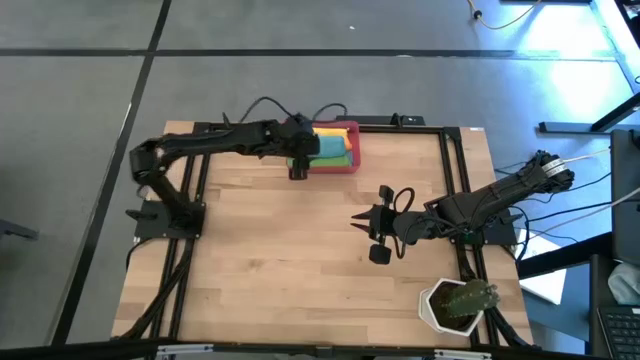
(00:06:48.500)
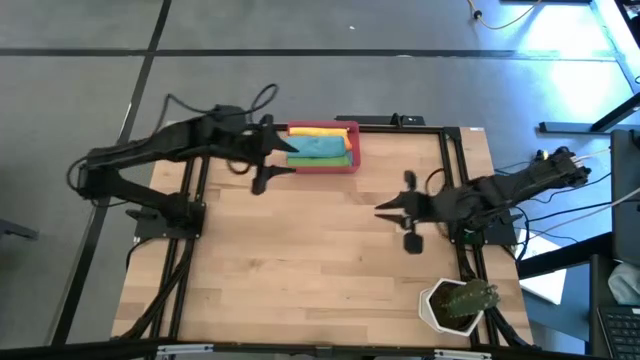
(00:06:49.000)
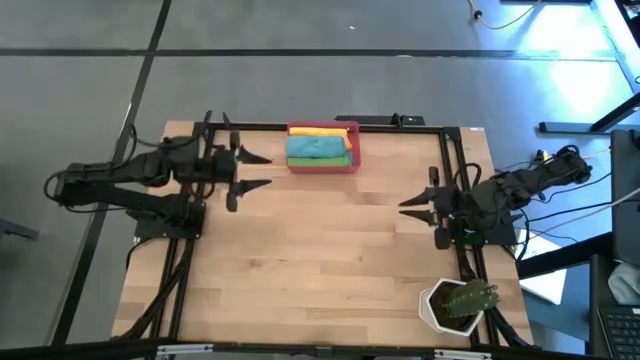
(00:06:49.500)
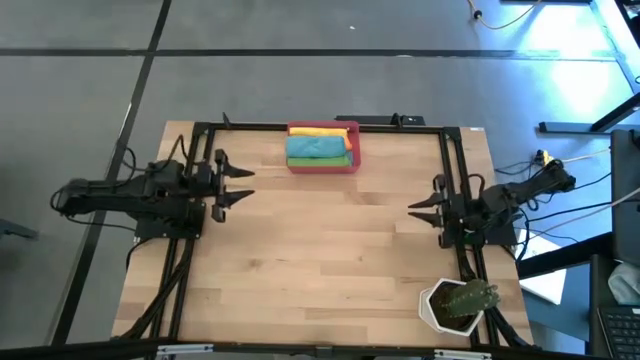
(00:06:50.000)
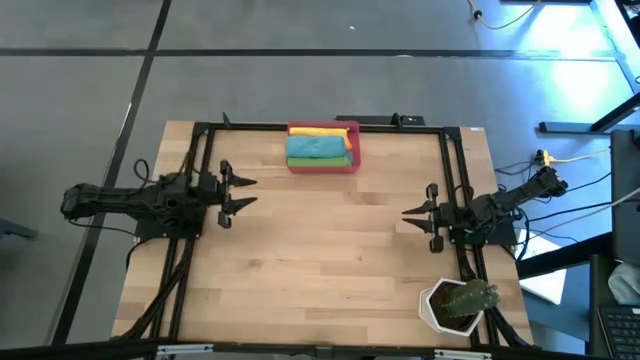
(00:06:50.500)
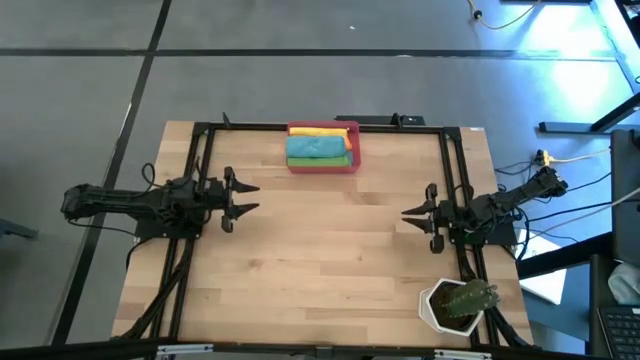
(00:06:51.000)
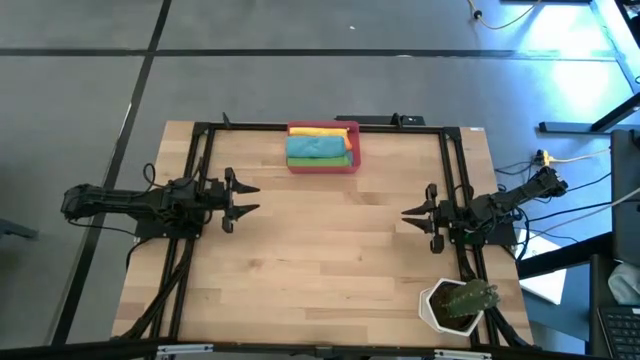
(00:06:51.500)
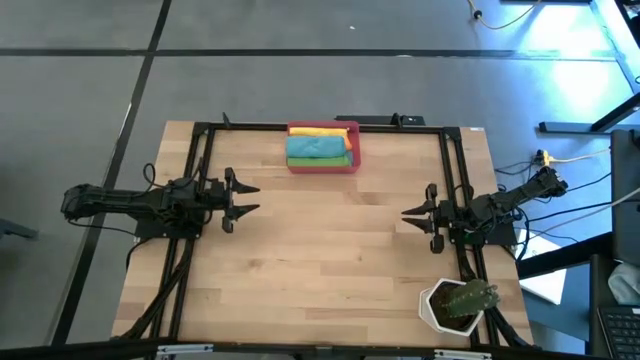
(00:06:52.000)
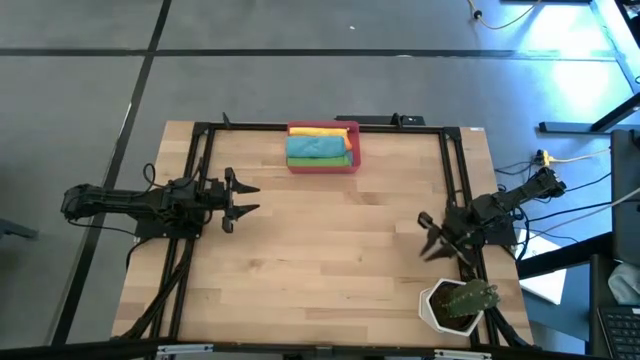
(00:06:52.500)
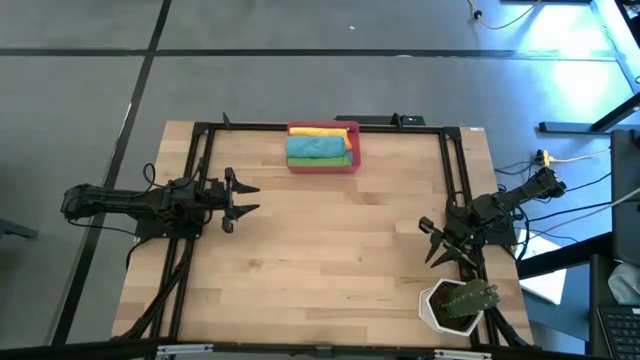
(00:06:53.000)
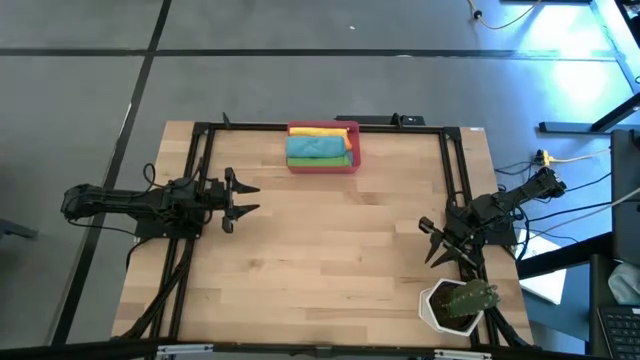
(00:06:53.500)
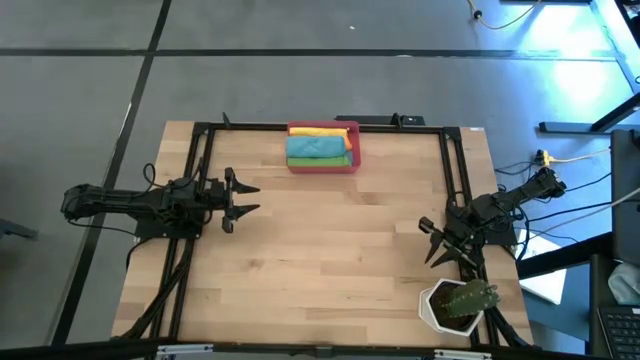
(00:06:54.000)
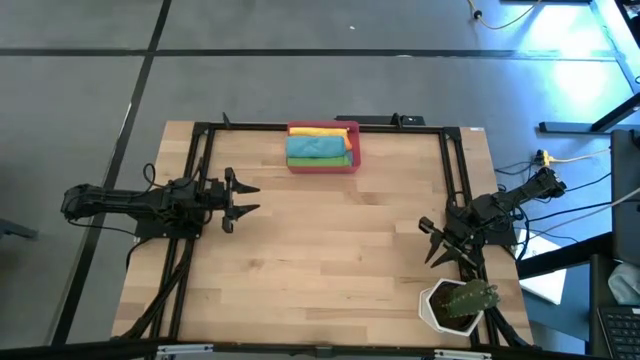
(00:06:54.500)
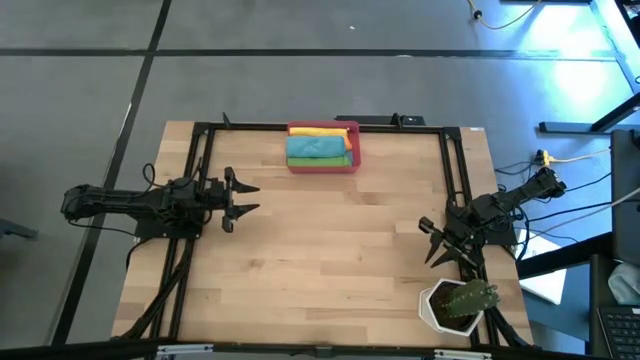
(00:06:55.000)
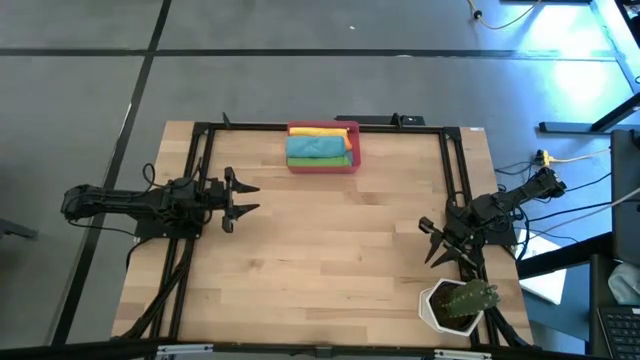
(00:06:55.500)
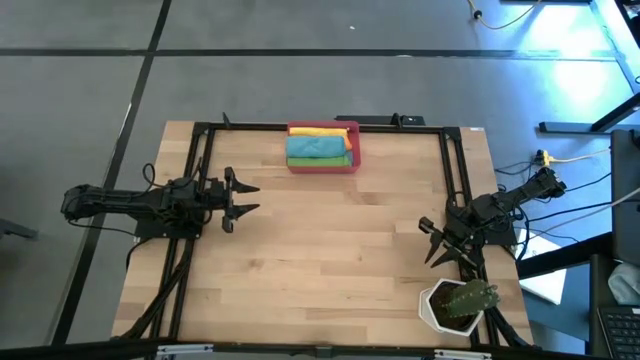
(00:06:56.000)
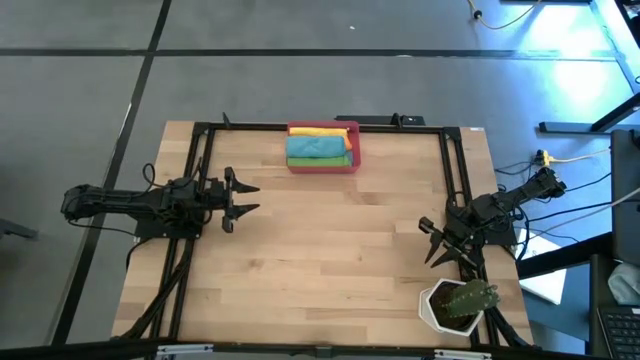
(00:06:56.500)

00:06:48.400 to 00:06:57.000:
Task: Roll microfiber towels into tight, uniform cylinder then place into a basket
Return to Home Position

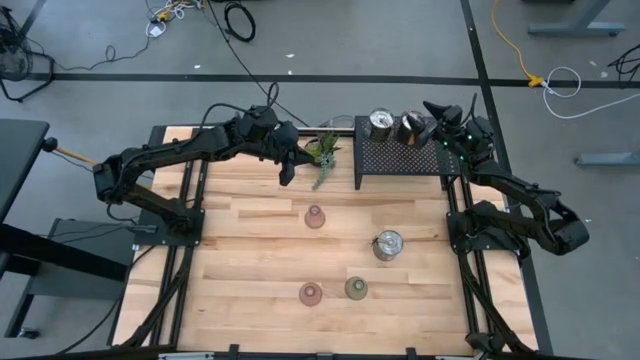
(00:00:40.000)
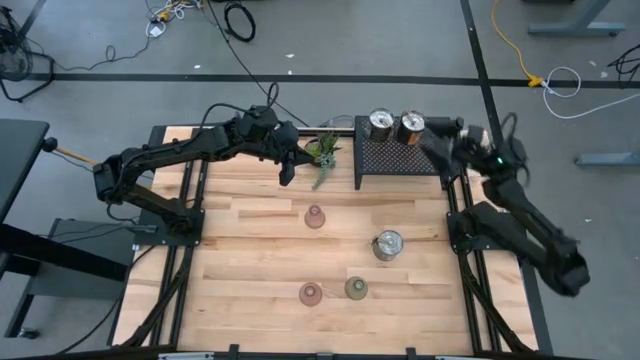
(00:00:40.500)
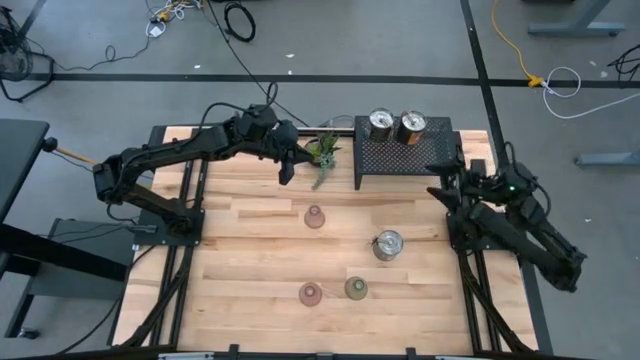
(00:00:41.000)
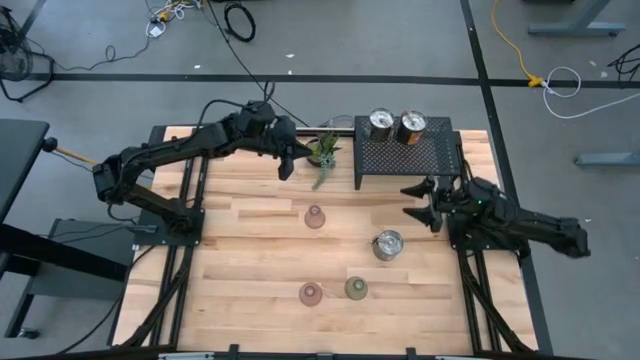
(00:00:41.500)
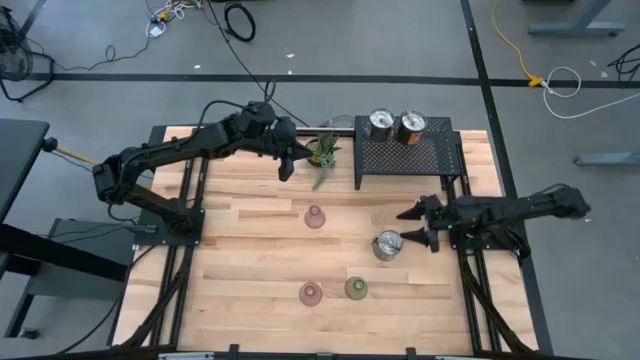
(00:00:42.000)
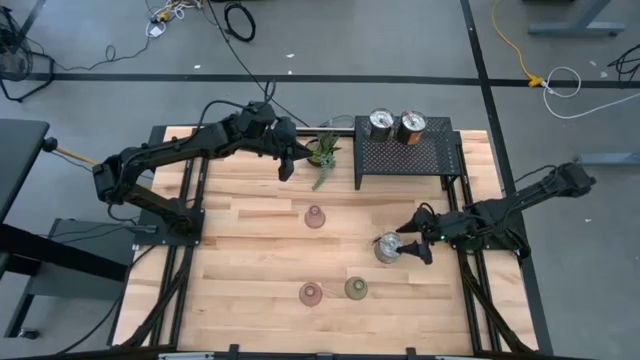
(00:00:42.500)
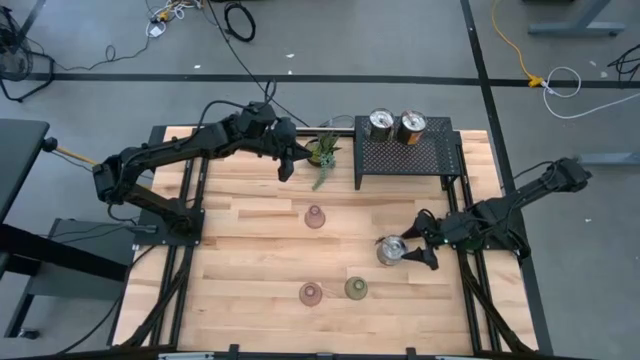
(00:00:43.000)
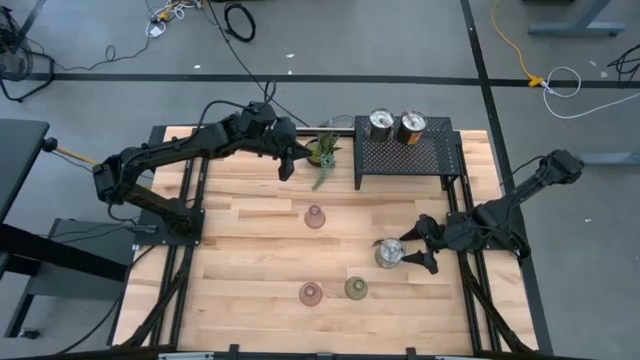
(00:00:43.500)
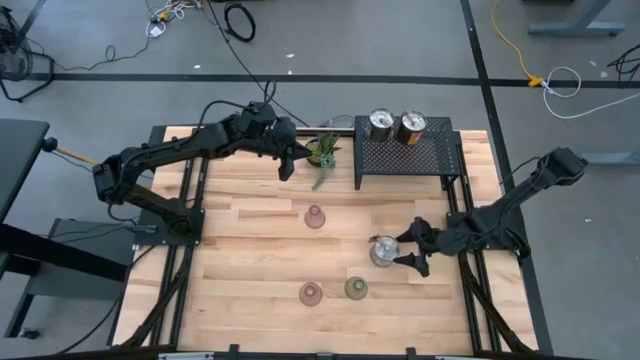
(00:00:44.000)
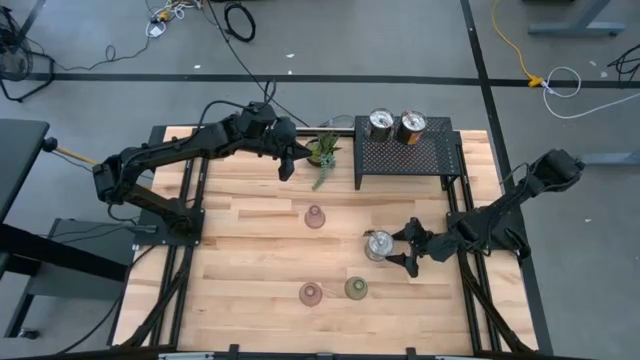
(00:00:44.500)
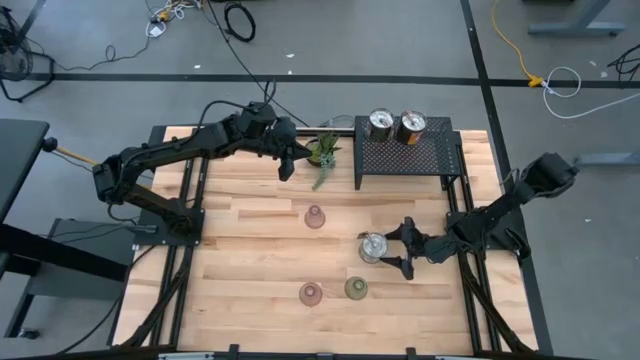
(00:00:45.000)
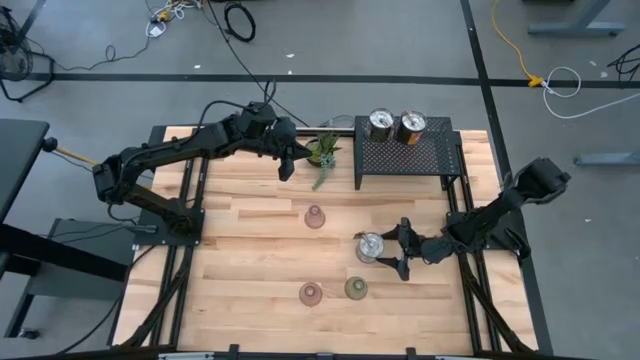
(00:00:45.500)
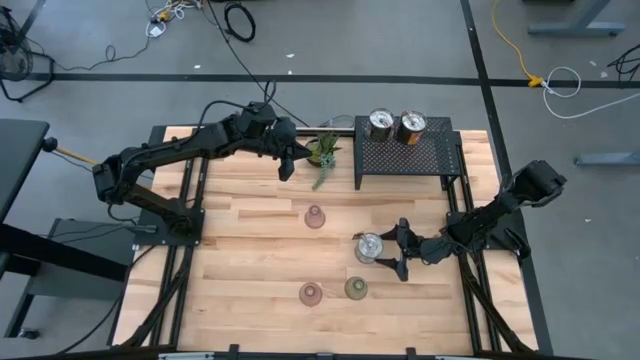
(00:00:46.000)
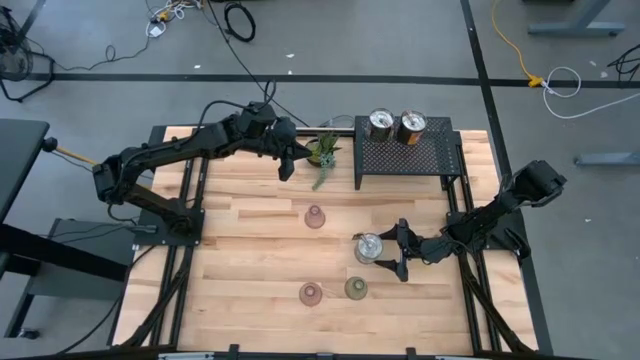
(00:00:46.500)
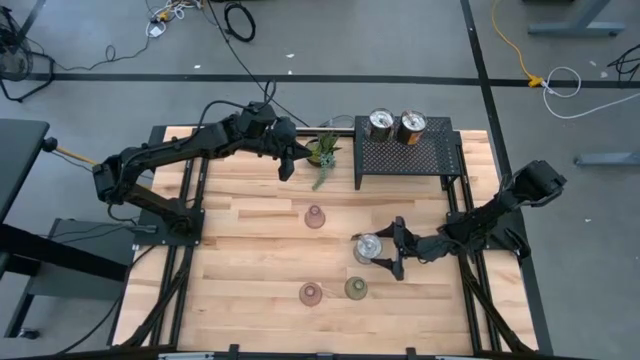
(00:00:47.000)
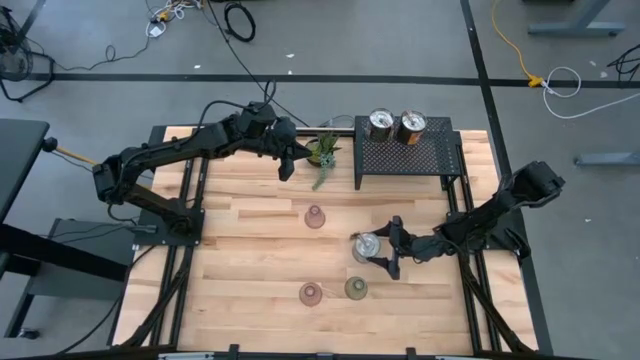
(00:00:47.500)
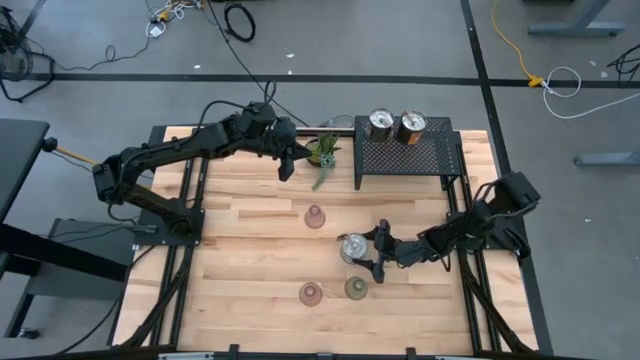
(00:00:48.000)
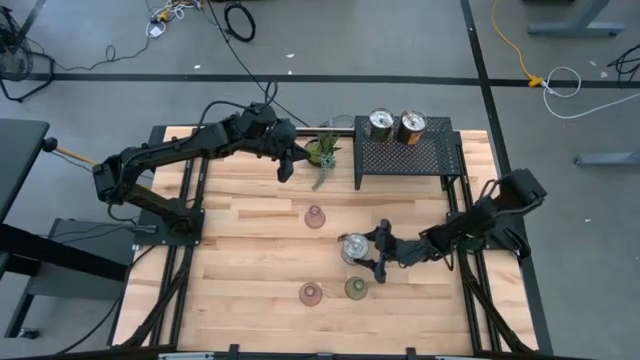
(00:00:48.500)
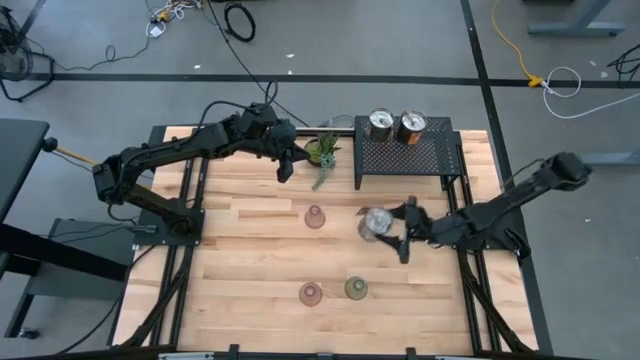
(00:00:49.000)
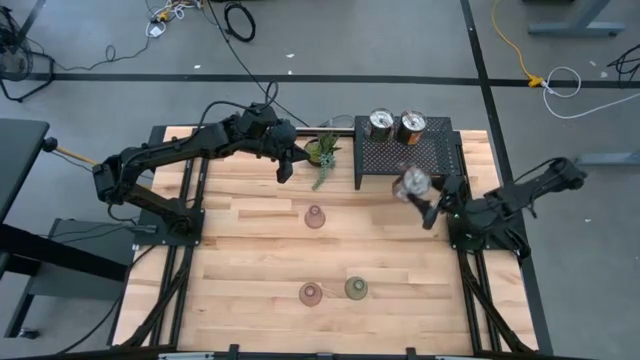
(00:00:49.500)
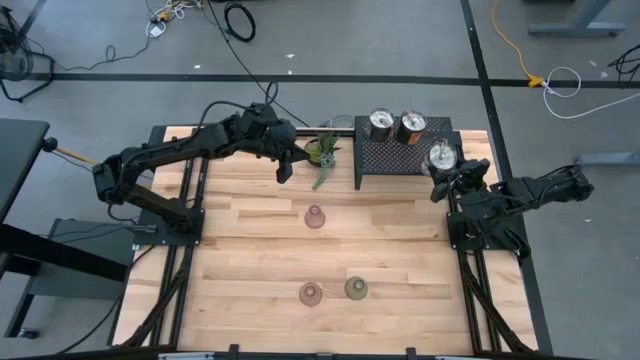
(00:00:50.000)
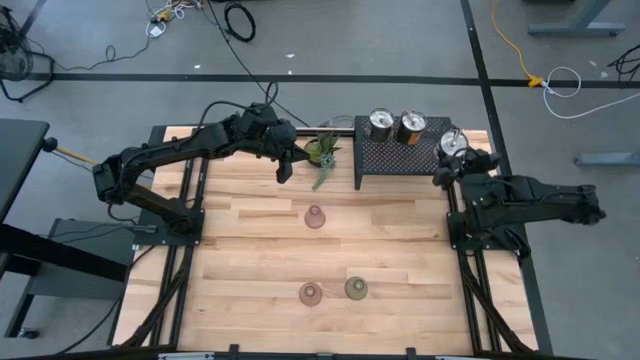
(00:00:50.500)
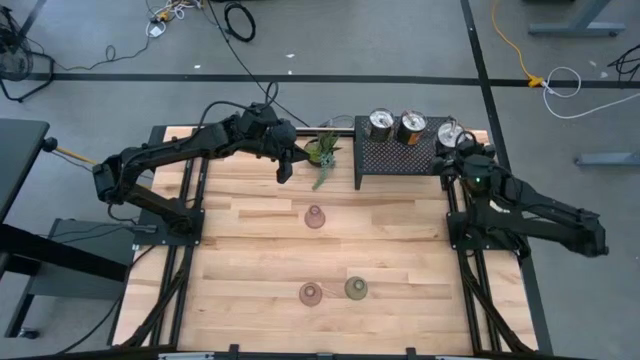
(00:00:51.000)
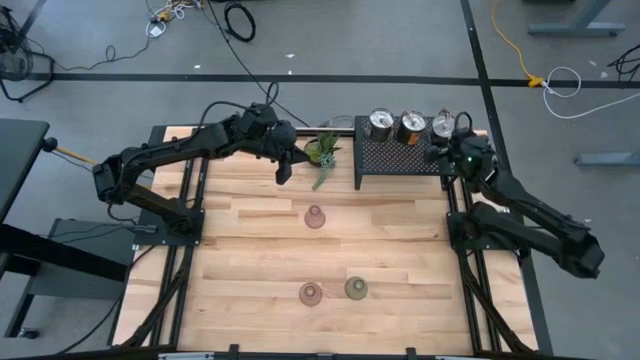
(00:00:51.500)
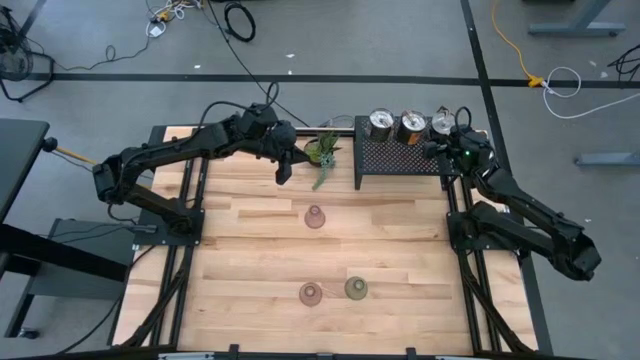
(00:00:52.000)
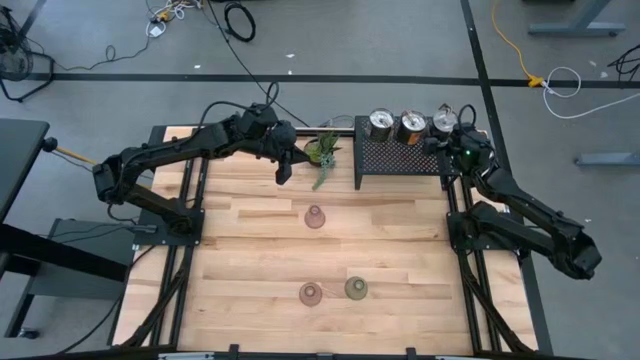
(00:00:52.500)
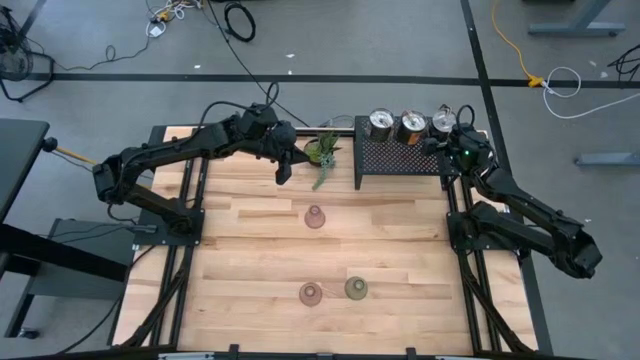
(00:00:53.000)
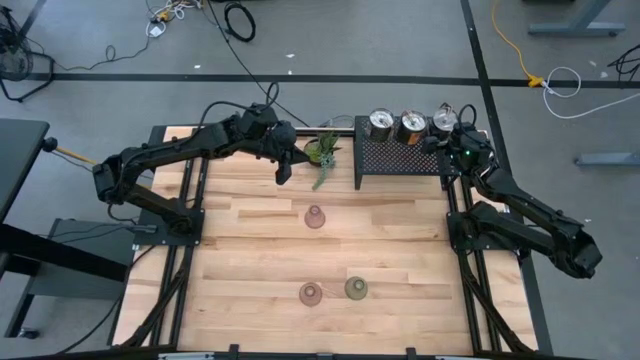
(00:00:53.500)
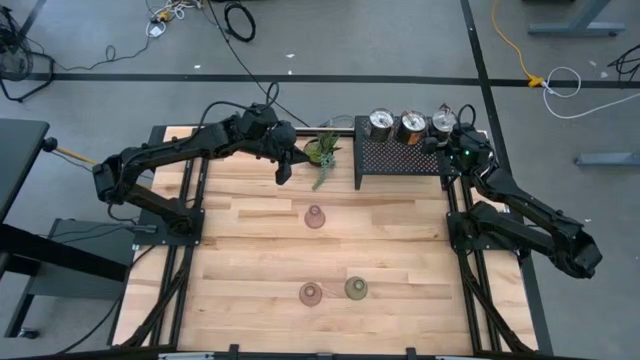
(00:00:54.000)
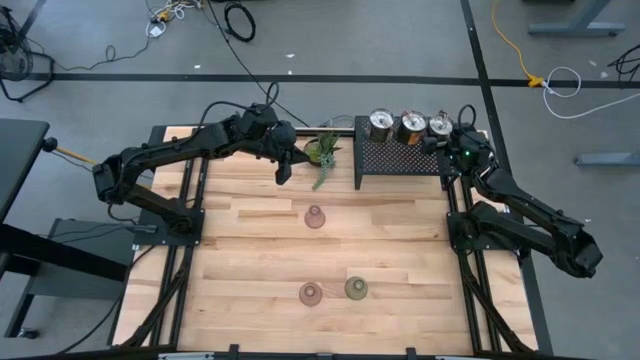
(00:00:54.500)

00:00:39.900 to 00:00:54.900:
Task: Pick & Place candle stick holders
Align the silver scented candle with the silver scented candles on the shelf
